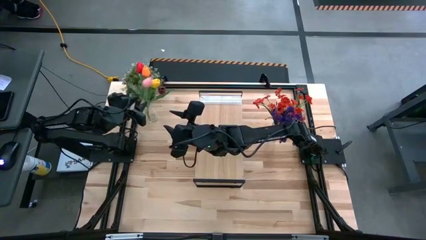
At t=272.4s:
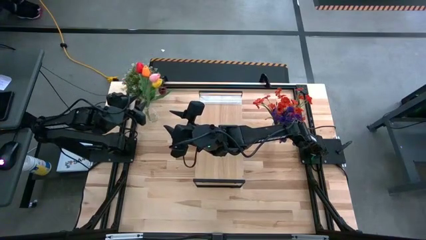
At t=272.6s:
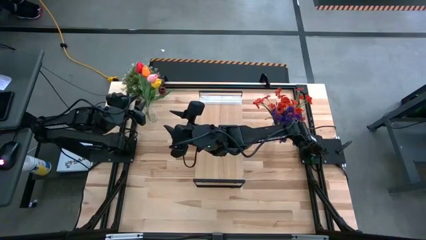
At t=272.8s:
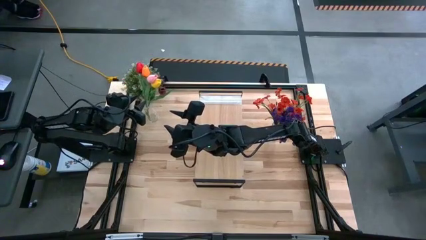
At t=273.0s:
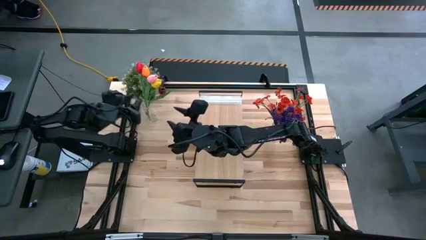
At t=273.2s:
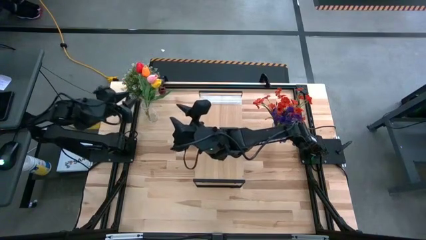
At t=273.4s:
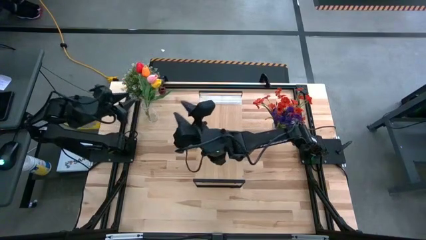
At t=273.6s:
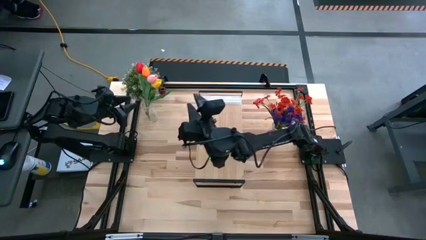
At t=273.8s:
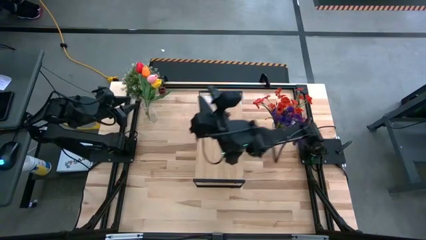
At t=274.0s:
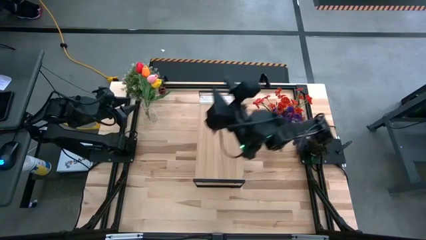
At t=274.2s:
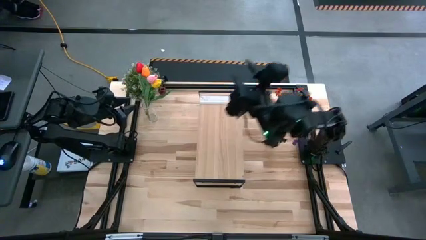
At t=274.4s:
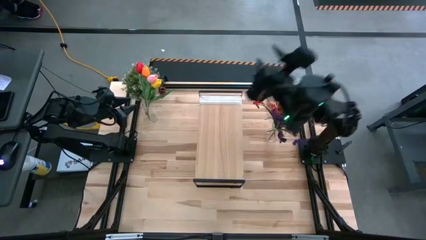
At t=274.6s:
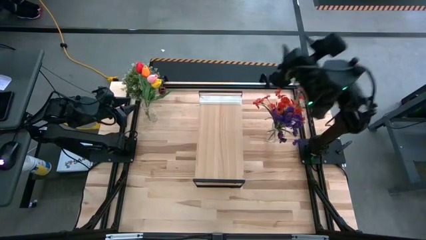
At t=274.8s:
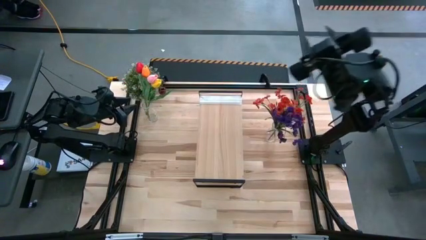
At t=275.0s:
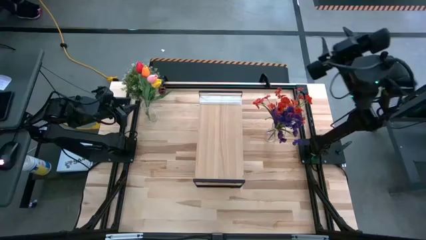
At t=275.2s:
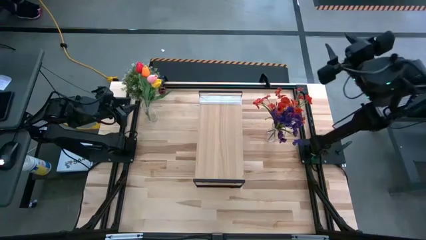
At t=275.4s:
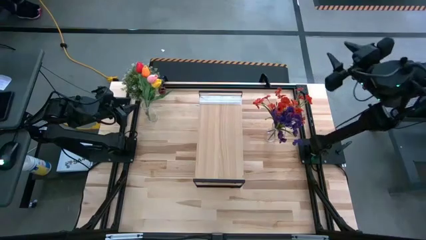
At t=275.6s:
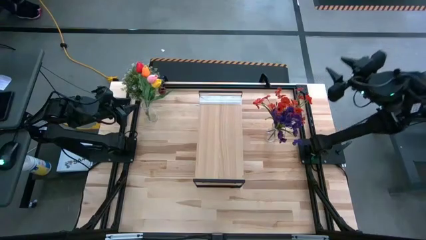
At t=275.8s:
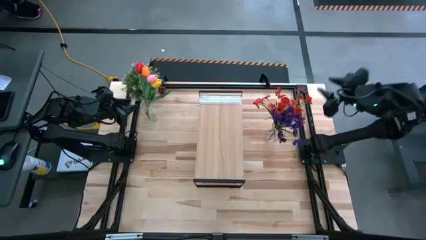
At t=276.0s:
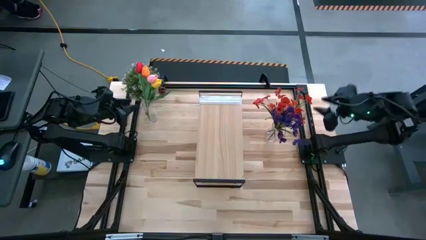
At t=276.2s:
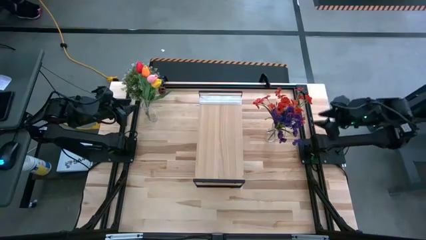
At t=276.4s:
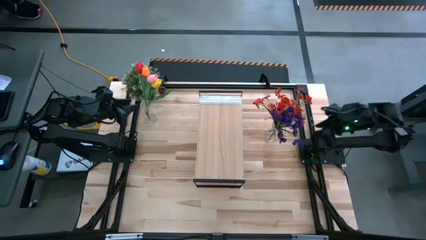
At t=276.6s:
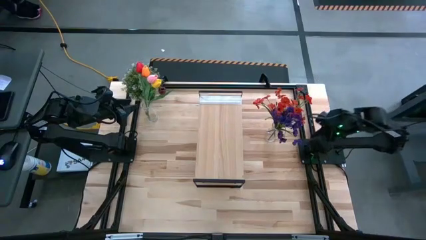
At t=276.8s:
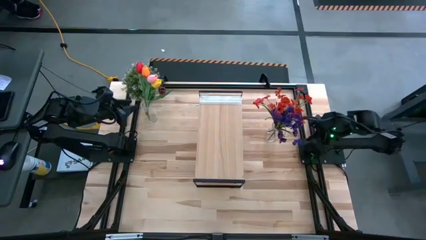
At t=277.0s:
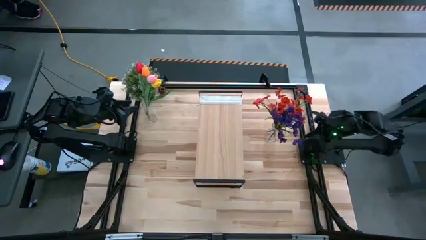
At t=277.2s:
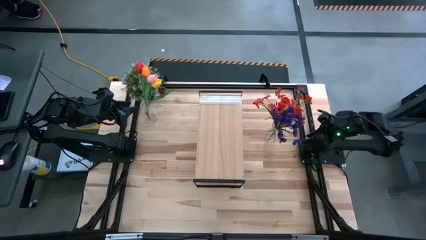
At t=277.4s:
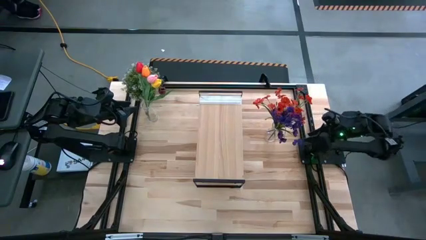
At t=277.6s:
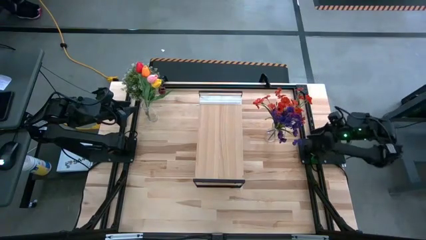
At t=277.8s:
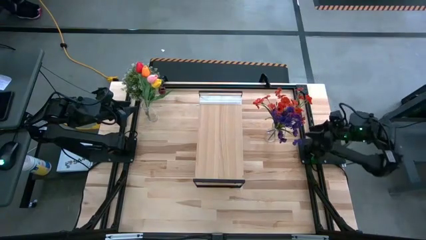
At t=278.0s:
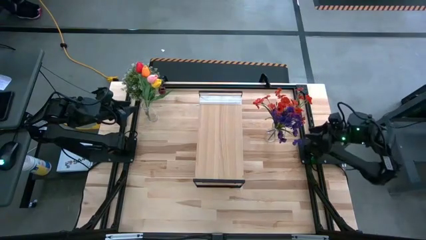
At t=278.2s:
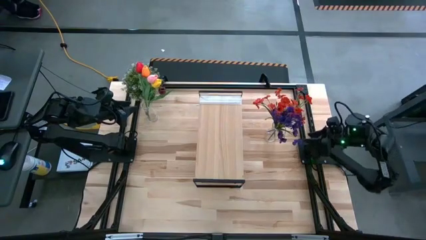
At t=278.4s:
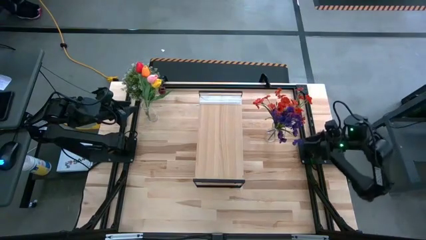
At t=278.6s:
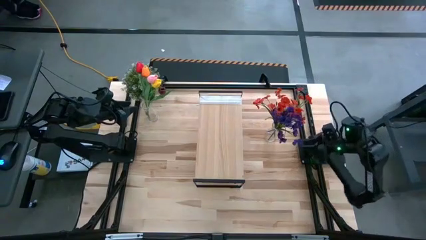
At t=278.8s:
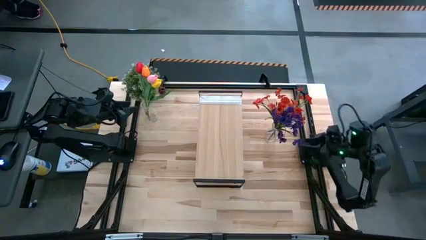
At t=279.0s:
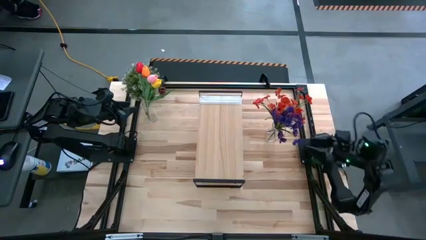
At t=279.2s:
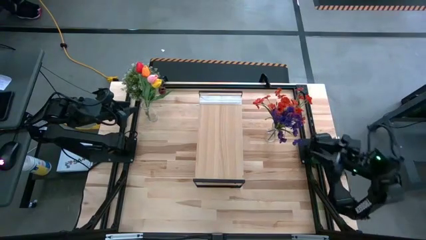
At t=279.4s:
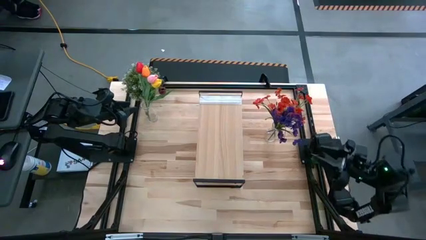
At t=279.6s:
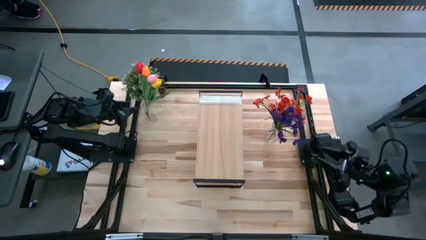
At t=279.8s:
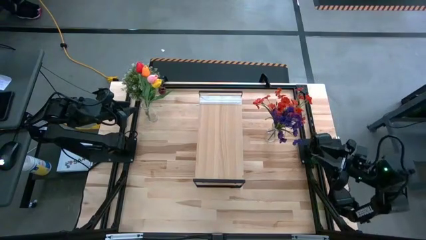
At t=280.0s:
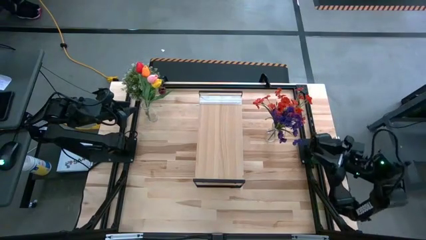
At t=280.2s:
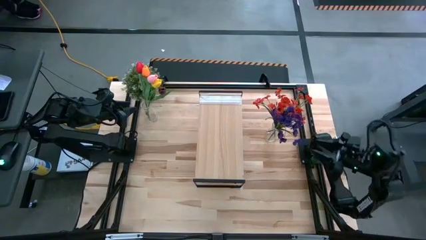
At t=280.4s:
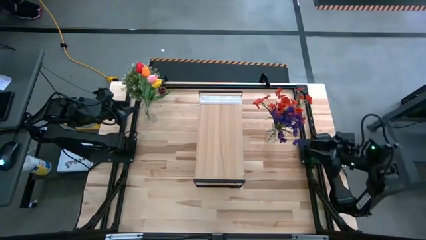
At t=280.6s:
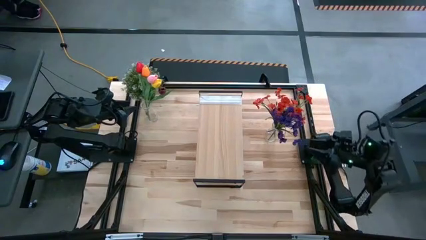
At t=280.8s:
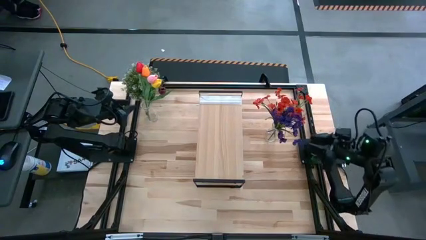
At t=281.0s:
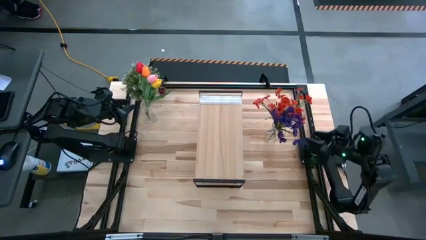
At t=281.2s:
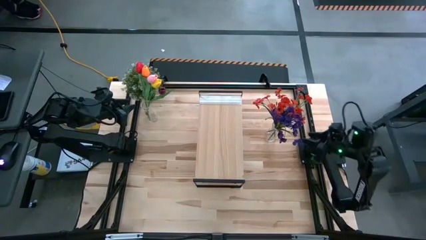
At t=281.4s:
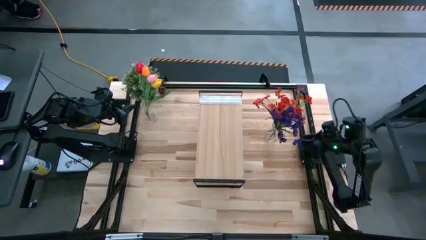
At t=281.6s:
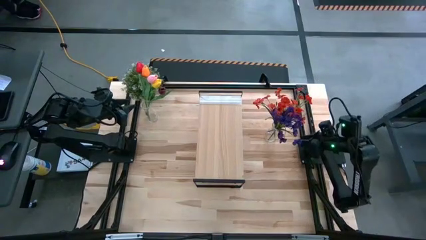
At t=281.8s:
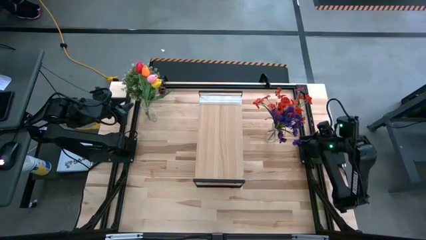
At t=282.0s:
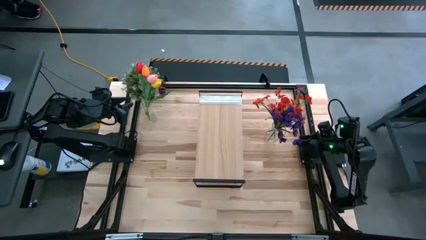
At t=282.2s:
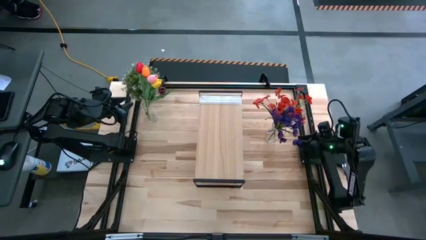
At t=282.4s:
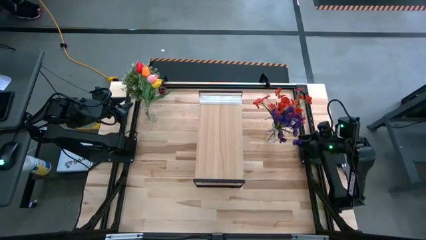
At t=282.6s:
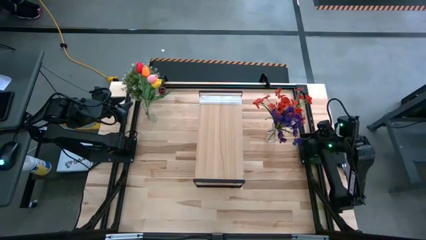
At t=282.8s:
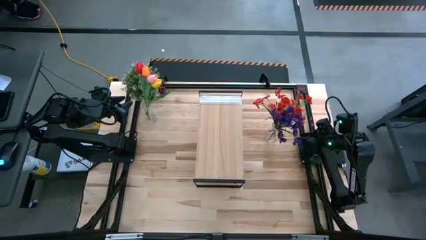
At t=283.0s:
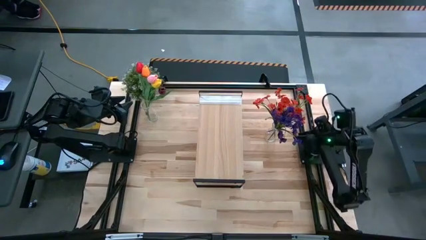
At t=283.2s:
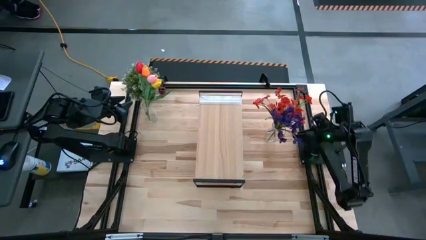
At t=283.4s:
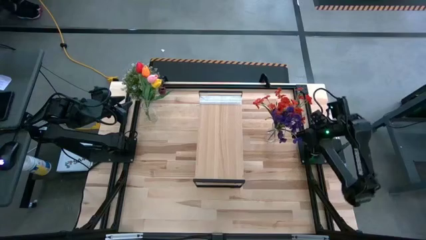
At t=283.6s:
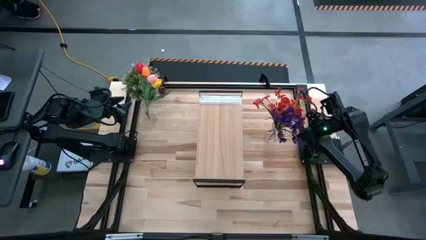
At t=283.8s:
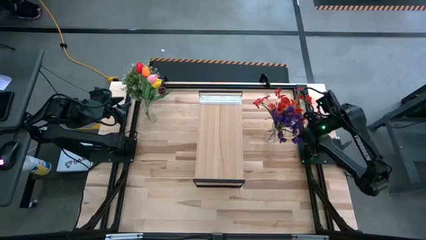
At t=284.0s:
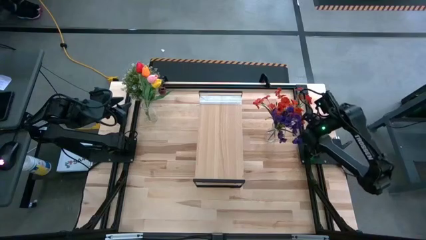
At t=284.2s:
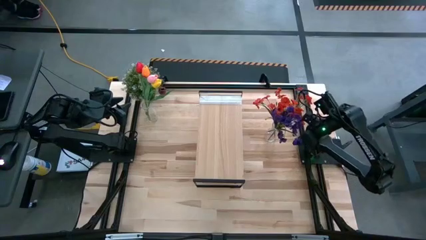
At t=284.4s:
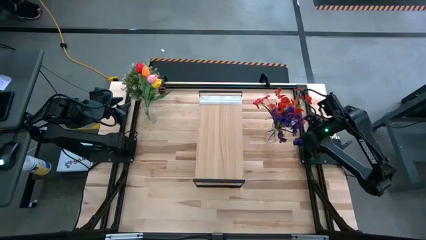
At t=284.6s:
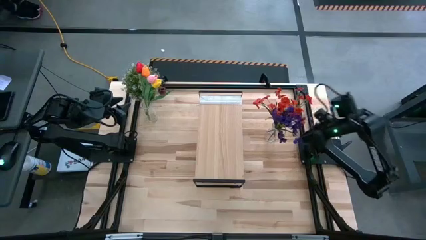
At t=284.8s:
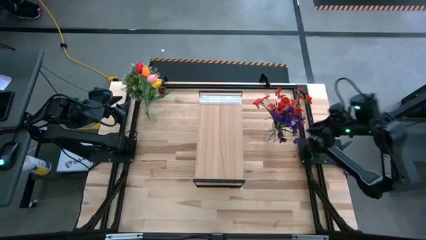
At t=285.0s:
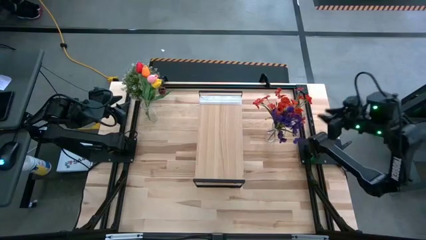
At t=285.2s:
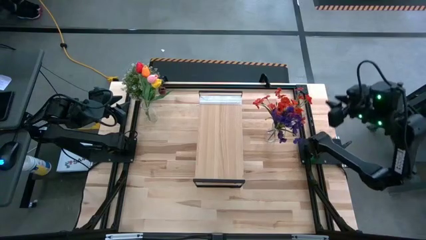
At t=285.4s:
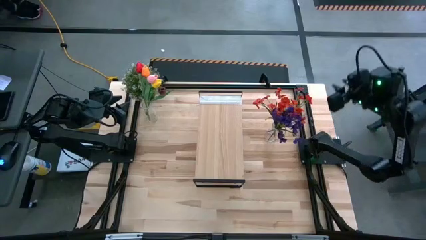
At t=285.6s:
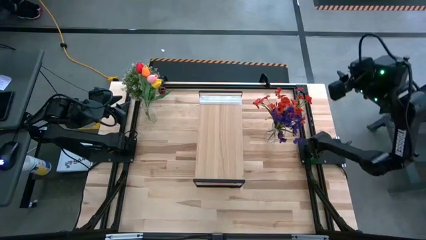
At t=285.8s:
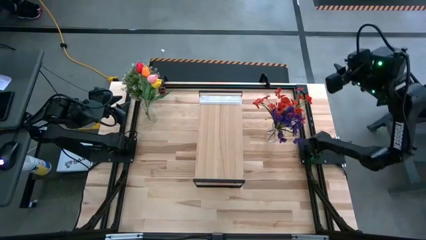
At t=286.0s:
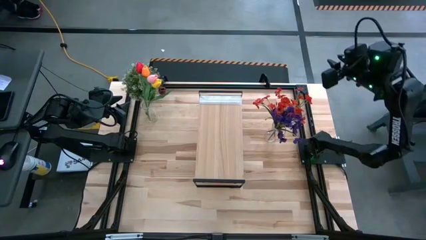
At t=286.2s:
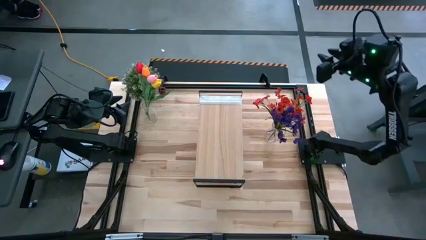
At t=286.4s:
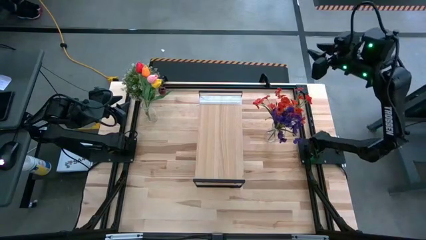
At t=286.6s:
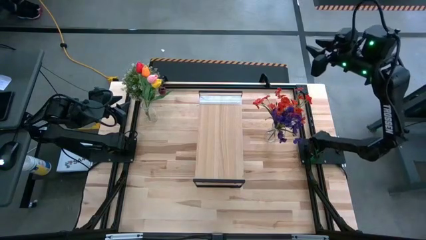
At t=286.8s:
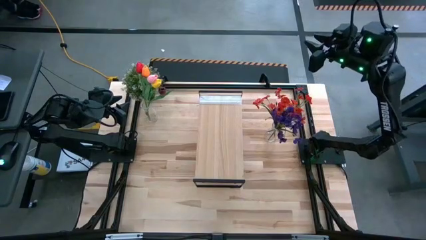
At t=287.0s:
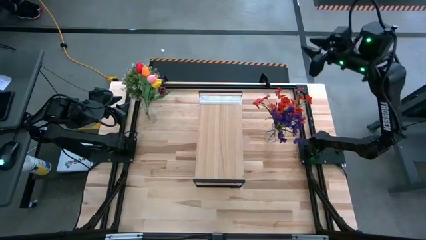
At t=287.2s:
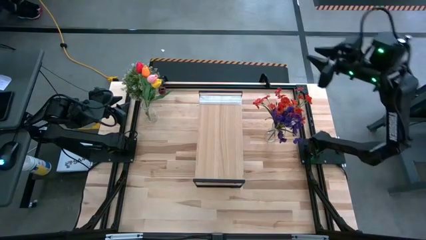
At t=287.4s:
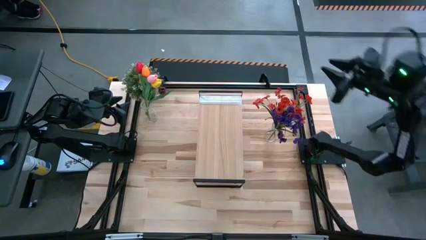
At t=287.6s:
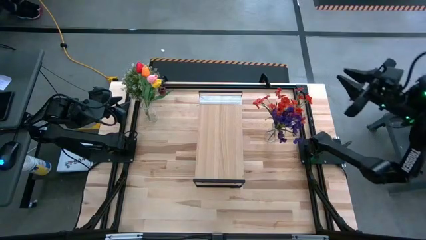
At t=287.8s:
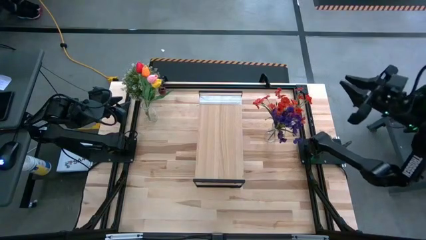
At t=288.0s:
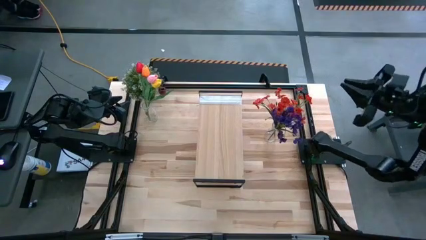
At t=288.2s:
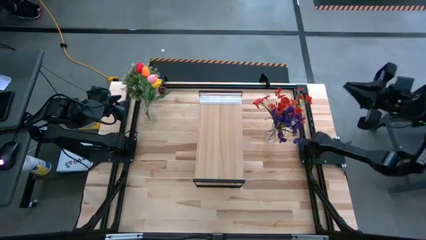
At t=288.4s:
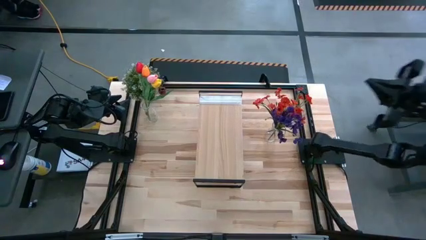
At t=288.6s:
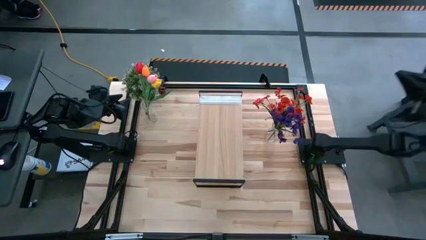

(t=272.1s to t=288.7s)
Task: Pick and place flowers into a vace then onto a shelf
Put the right transparent flower vase on the shelf
